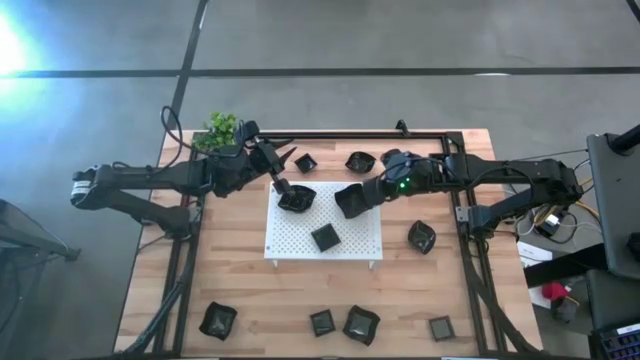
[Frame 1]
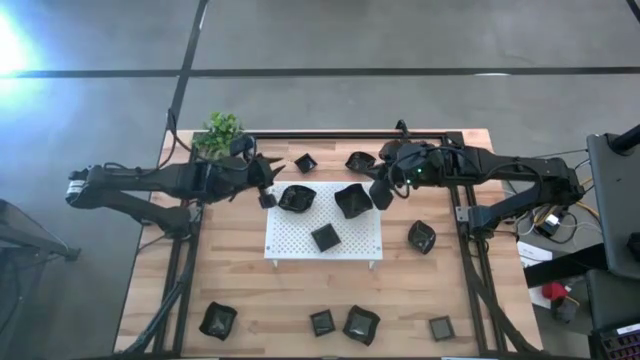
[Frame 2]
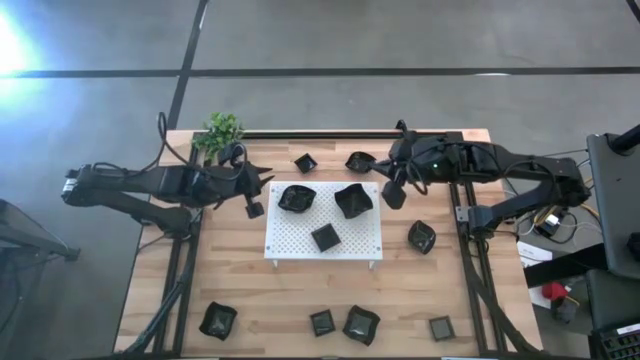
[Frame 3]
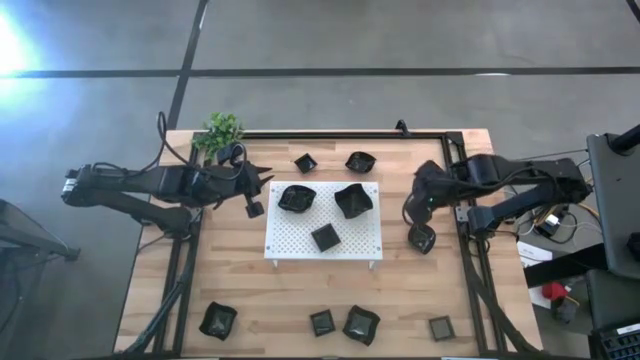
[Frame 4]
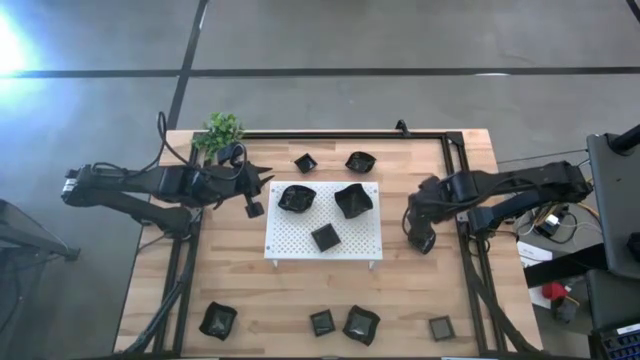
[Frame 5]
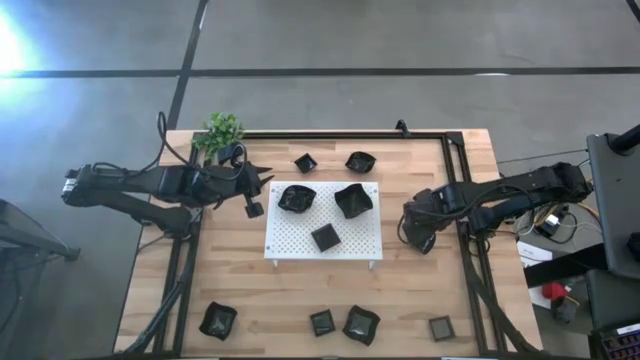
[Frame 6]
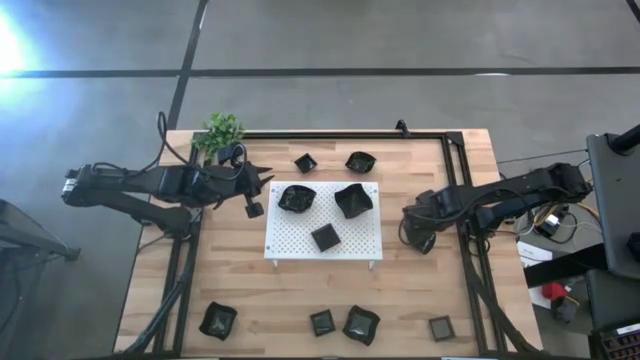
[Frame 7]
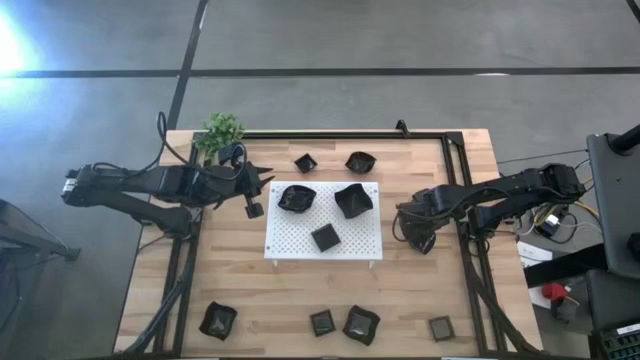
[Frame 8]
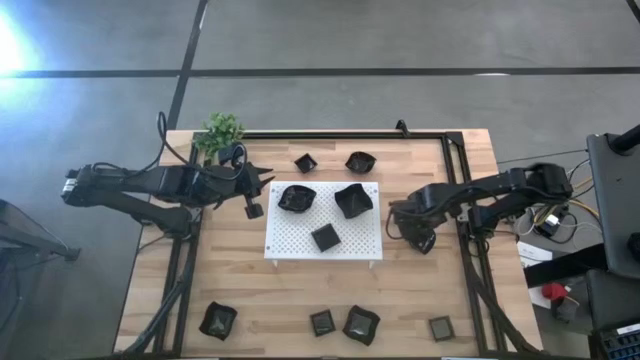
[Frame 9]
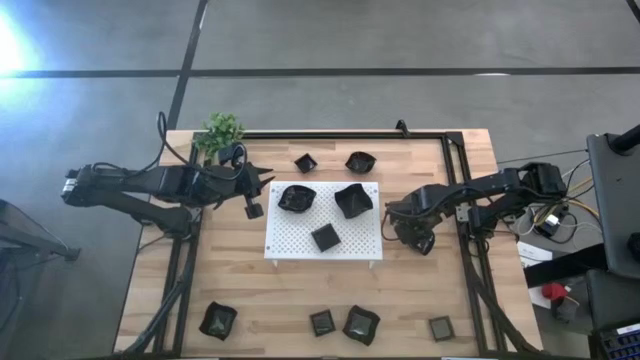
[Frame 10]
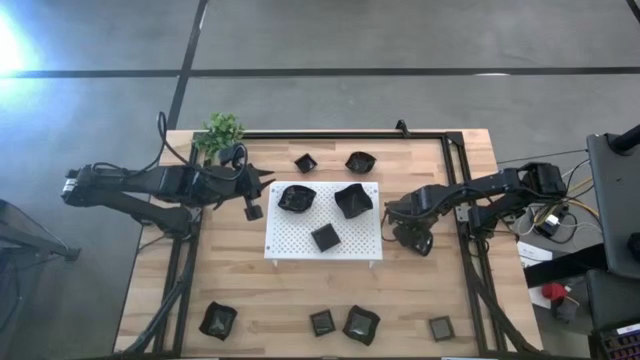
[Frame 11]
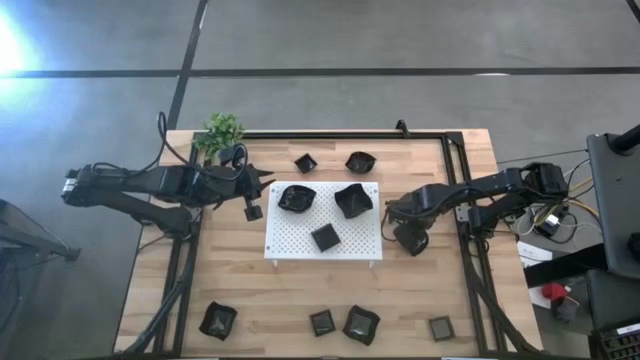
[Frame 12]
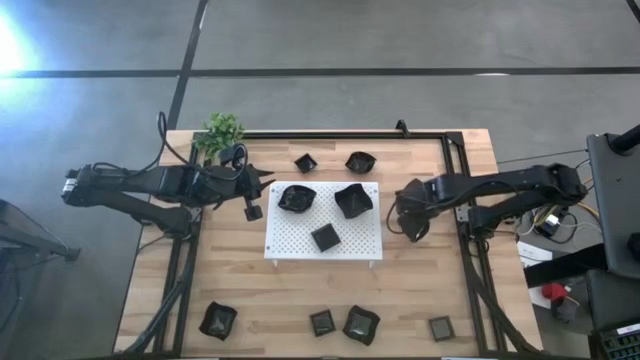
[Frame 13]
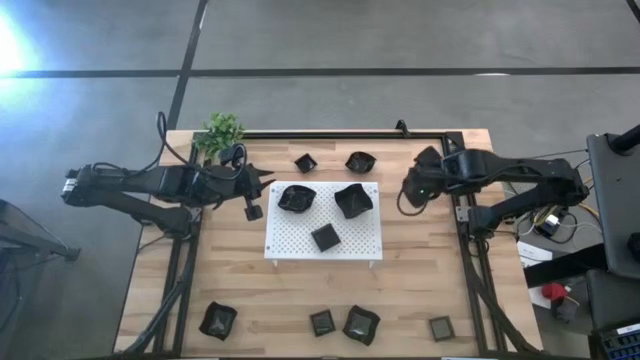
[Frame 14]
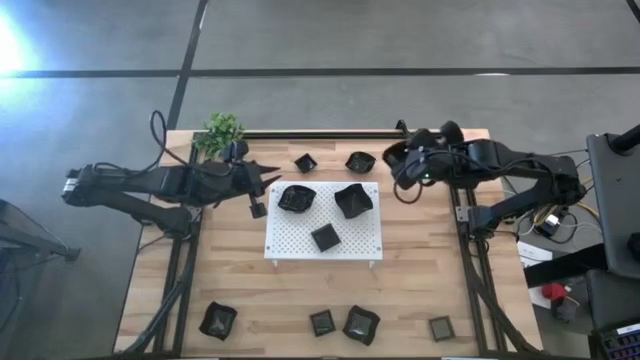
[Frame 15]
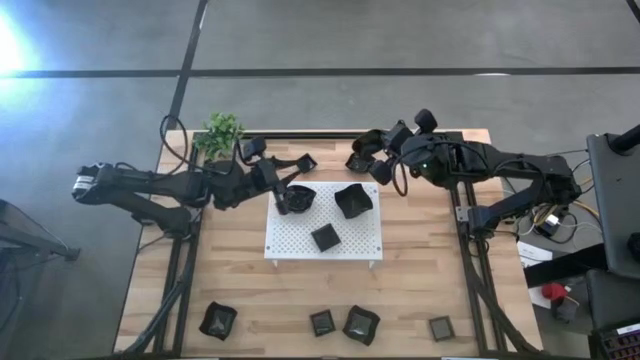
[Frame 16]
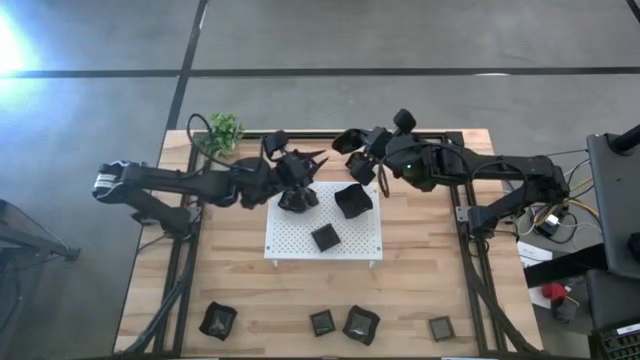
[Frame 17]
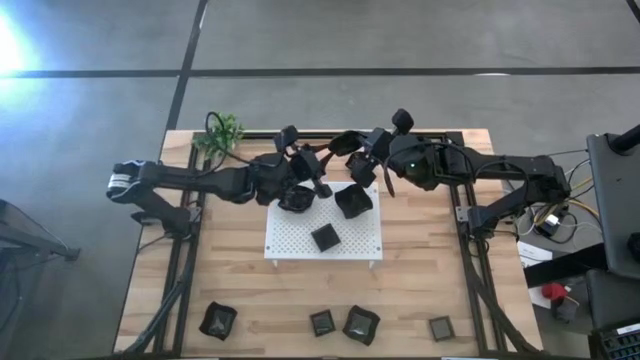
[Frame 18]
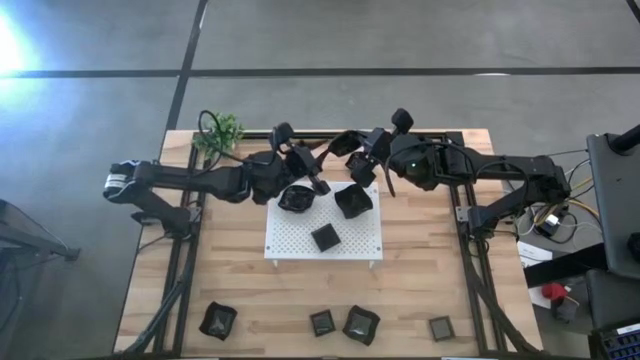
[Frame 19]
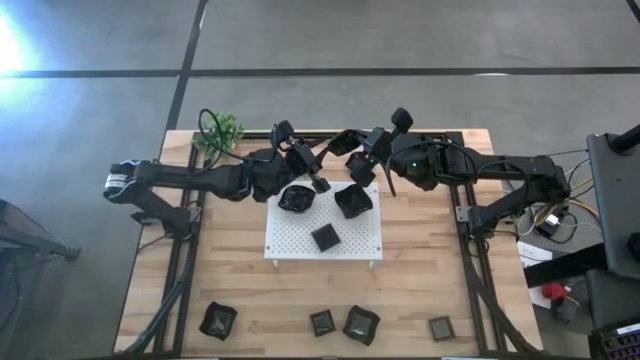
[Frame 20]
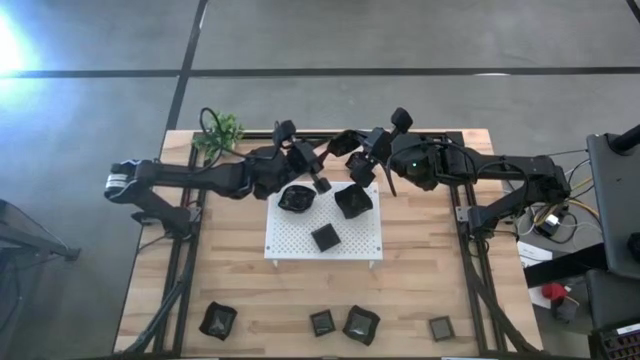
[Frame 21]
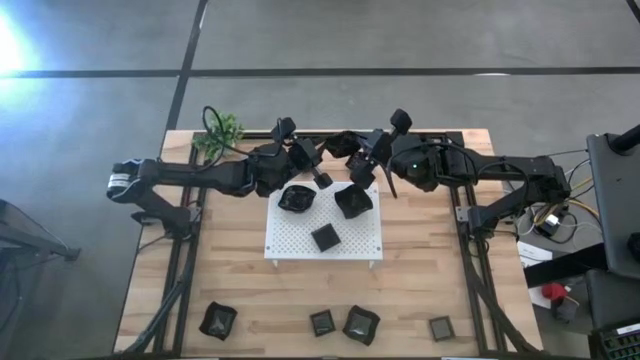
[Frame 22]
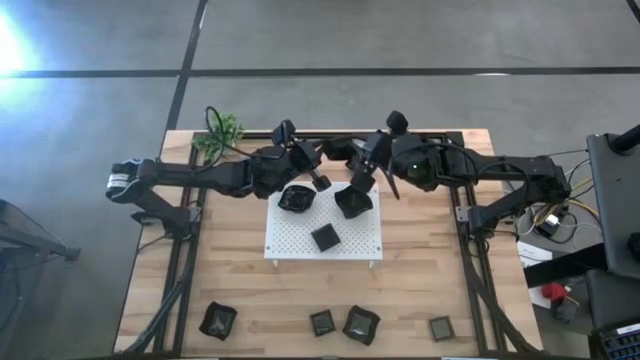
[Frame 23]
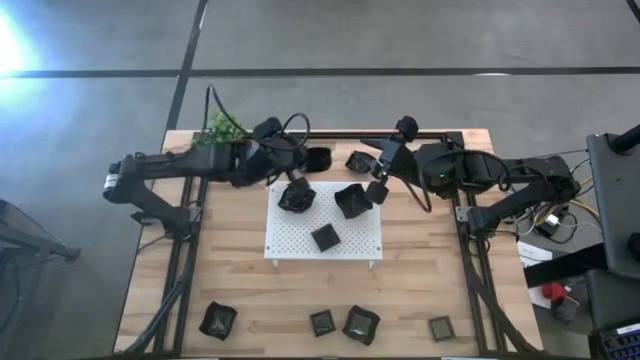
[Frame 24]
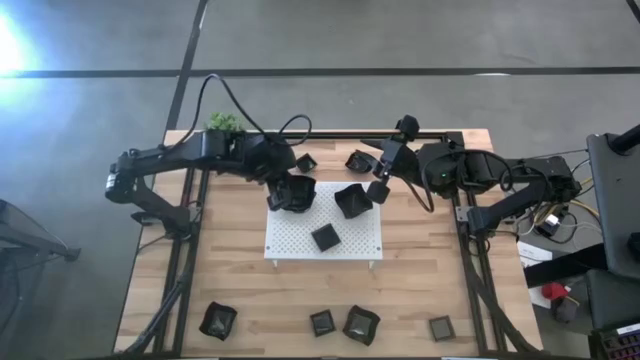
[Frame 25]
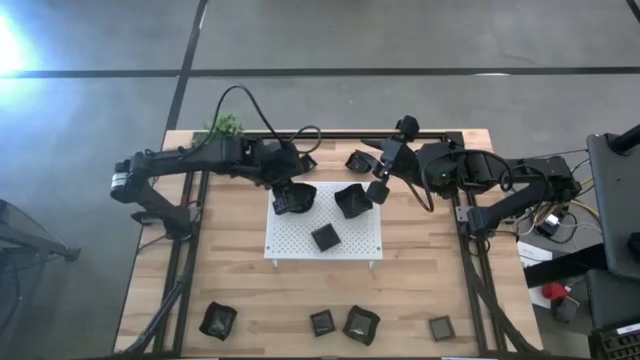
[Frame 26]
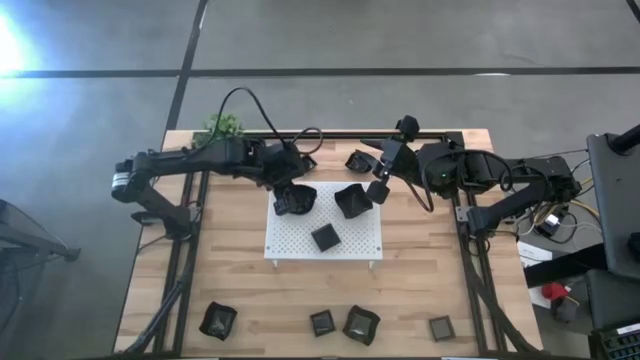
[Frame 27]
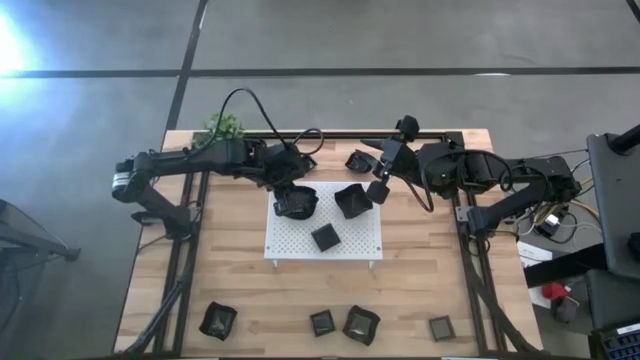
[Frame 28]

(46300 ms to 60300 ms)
Task: Pick & Place Mini shaped plates
Stack the black leaf shaped plate on top of the black leaf shaped plate on the shelf

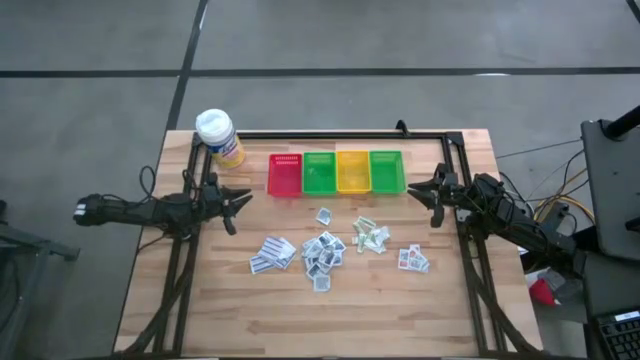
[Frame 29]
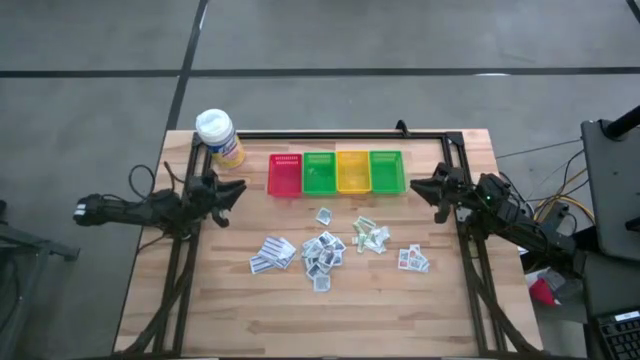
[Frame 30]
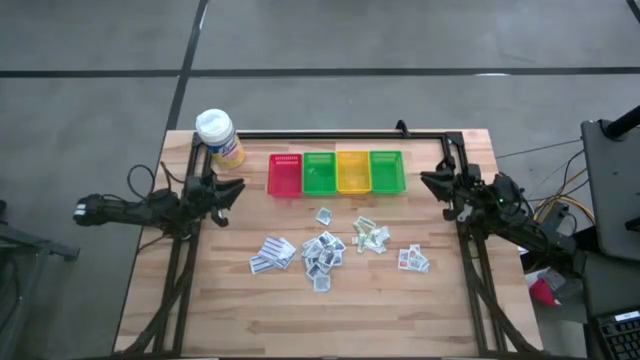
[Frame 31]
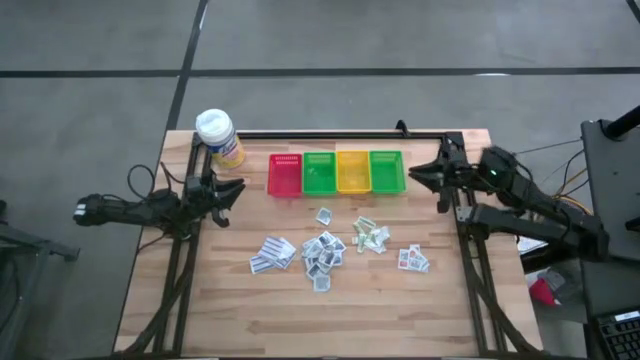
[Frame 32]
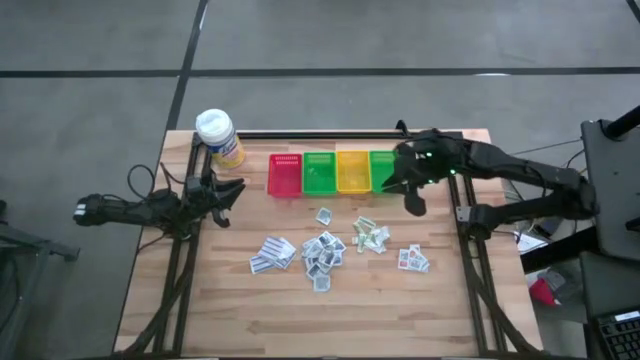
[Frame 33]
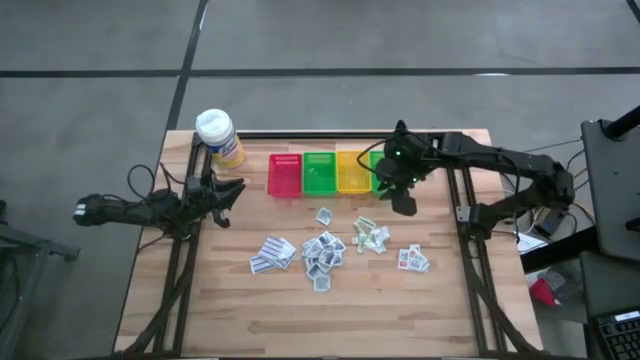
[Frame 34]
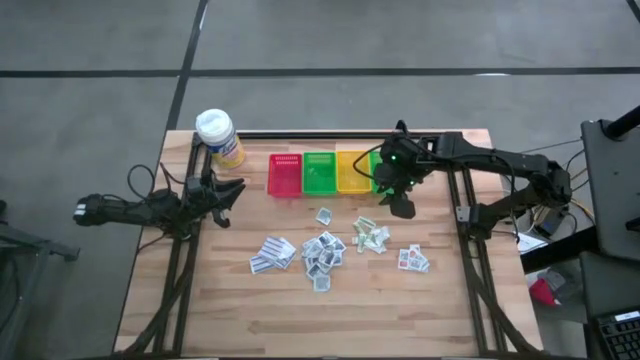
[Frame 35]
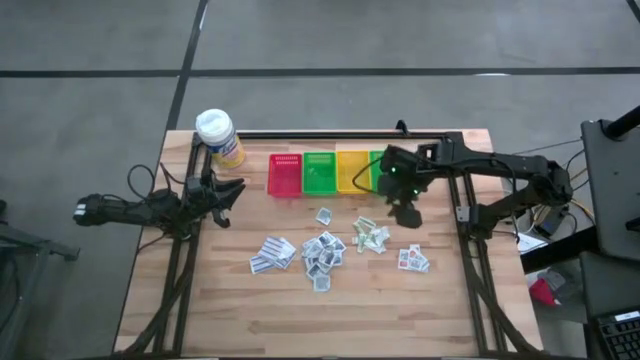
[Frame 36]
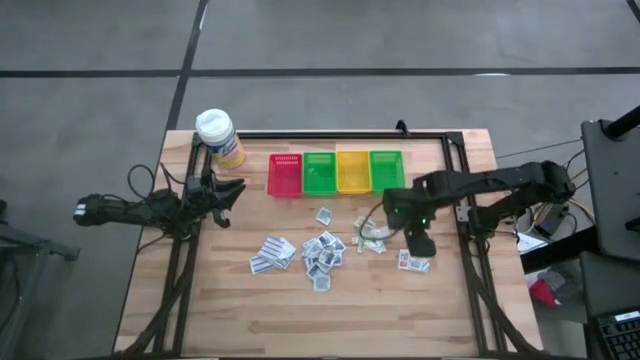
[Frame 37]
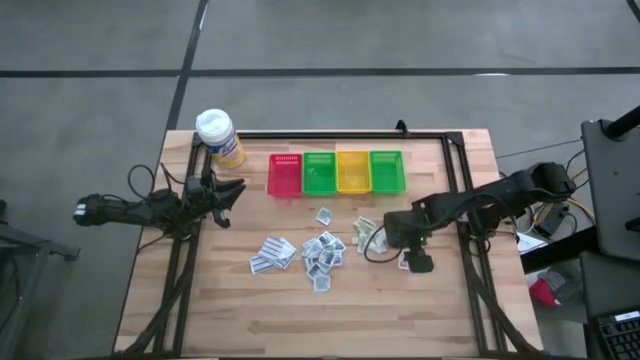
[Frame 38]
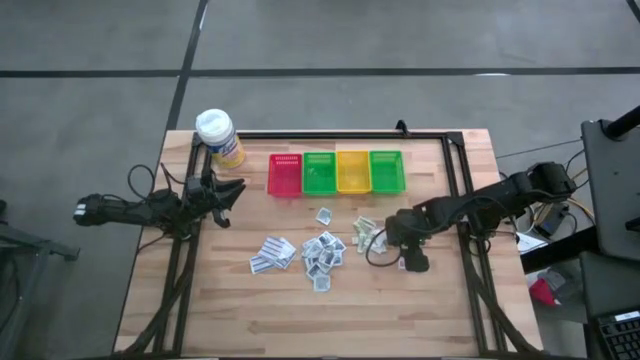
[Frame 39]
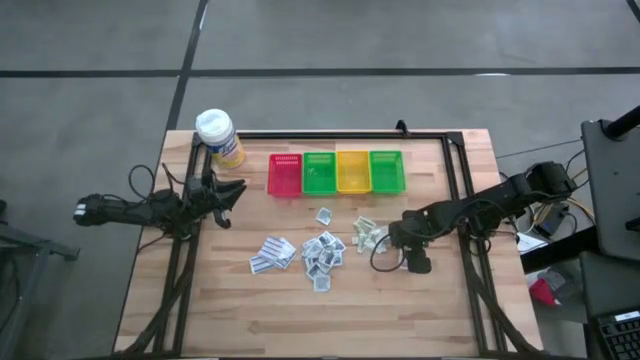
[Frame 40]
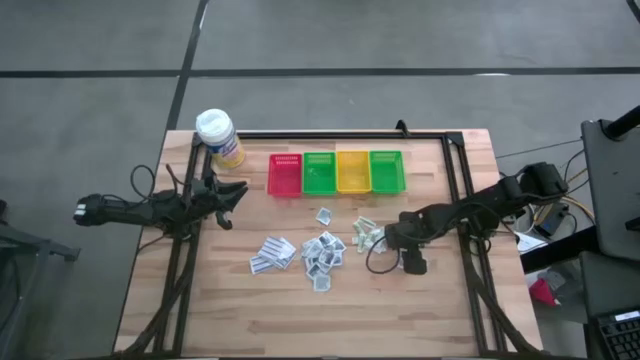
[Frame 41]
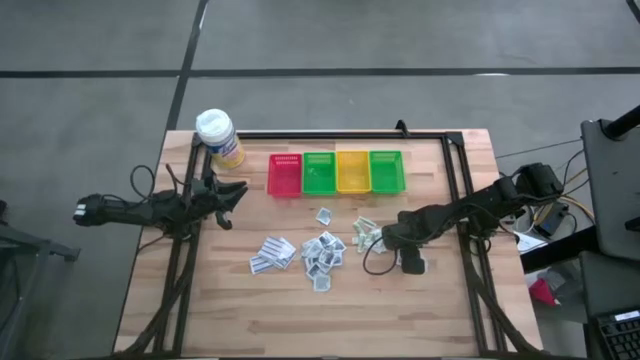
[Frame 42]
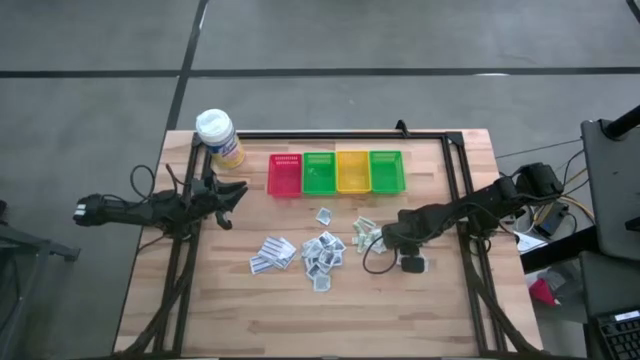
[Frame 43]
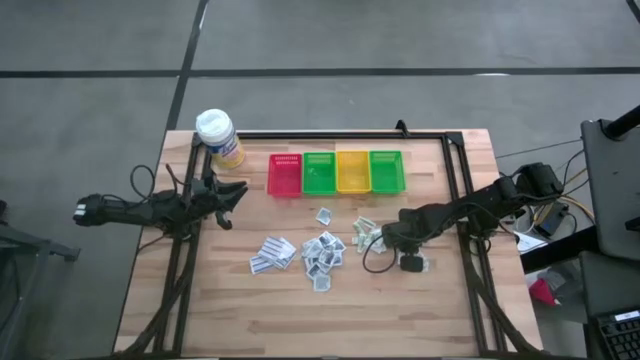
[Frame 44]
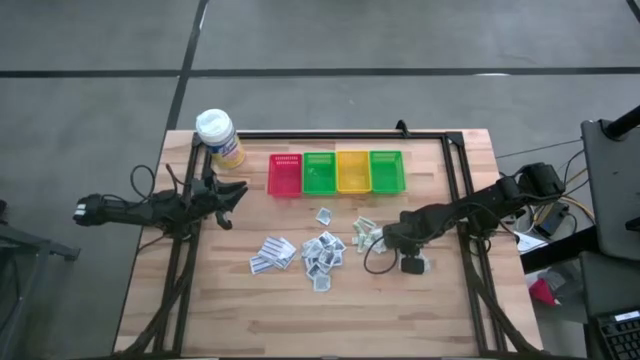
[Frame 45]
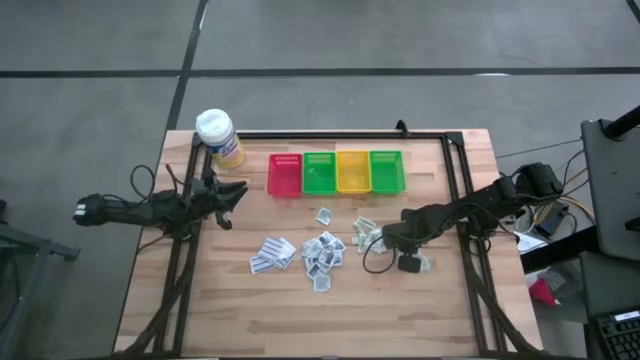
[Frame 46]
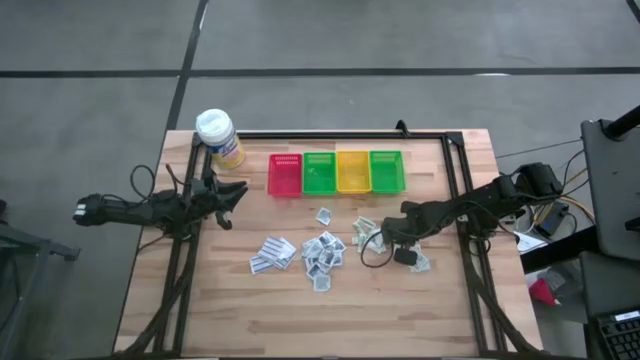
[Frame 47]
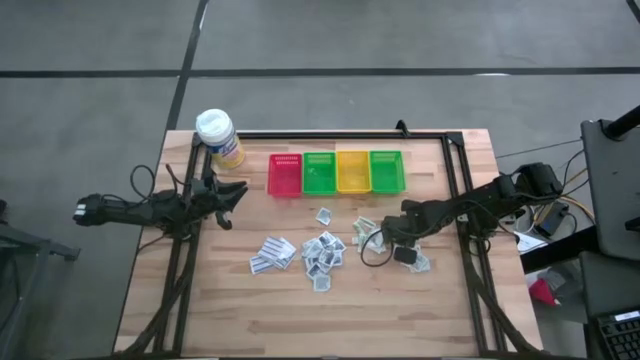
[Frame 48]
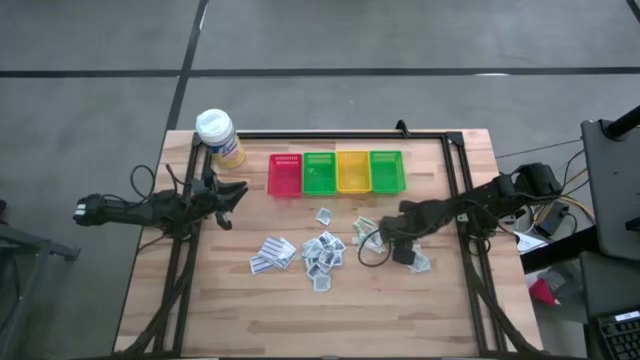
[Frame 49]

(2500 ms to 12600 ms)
Task: Pick & Place First Aid Supplies
Put the ointment pack into the red bin
